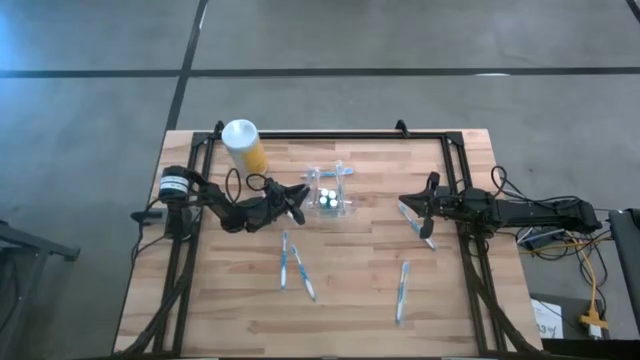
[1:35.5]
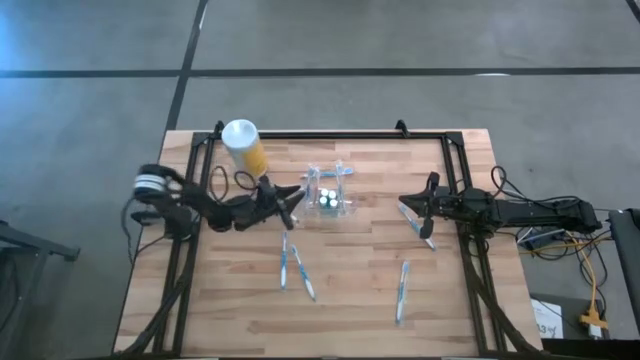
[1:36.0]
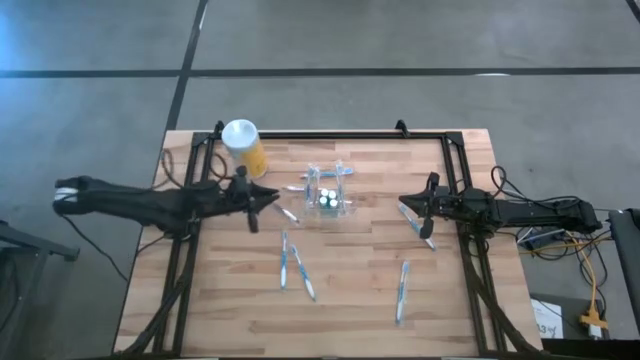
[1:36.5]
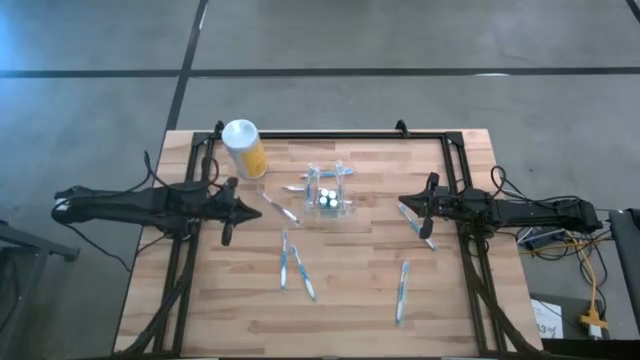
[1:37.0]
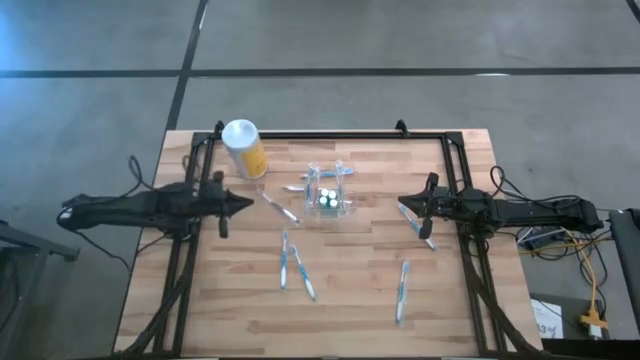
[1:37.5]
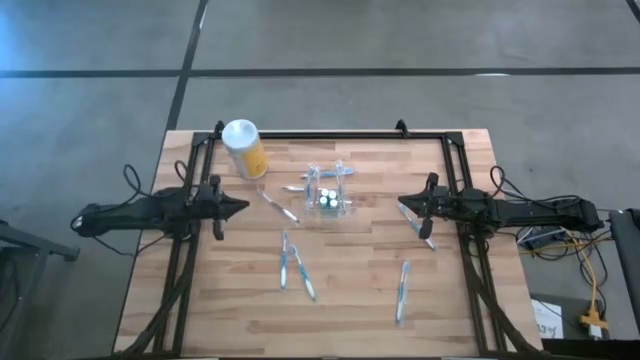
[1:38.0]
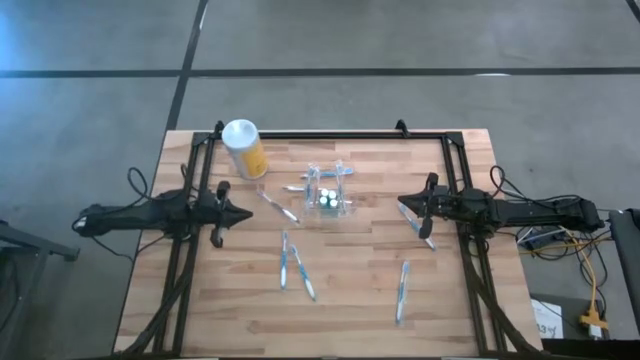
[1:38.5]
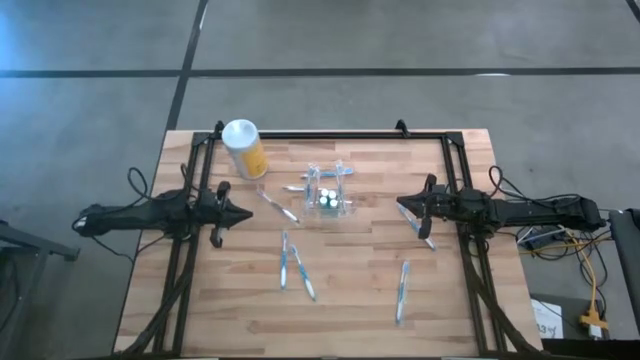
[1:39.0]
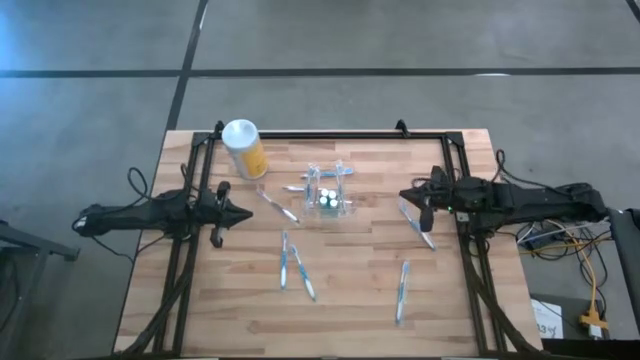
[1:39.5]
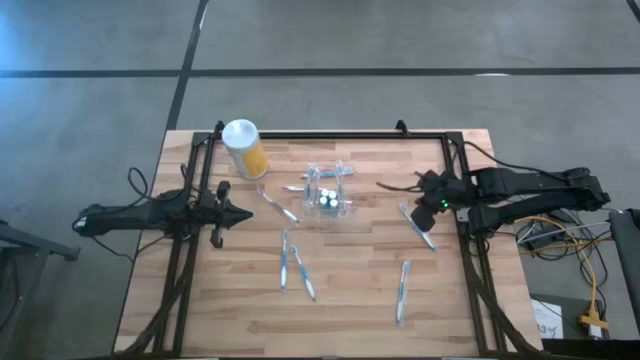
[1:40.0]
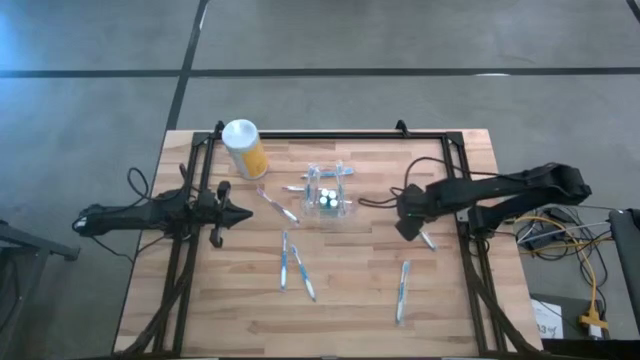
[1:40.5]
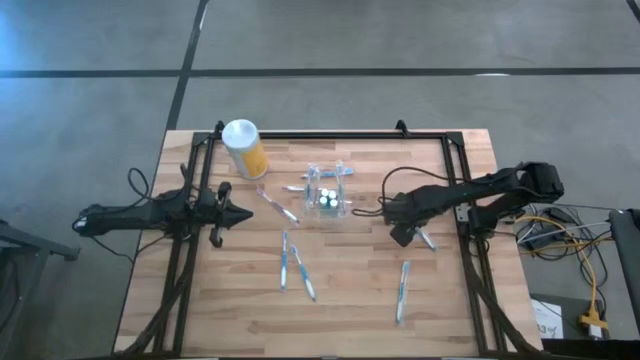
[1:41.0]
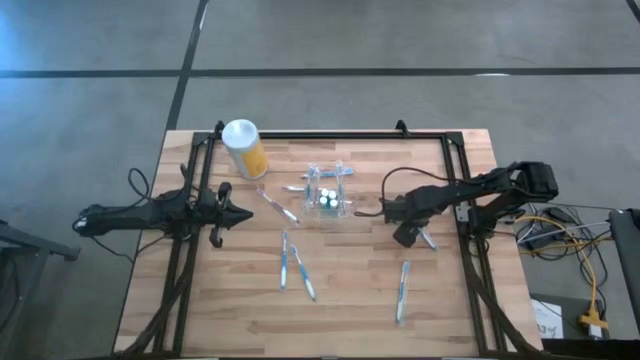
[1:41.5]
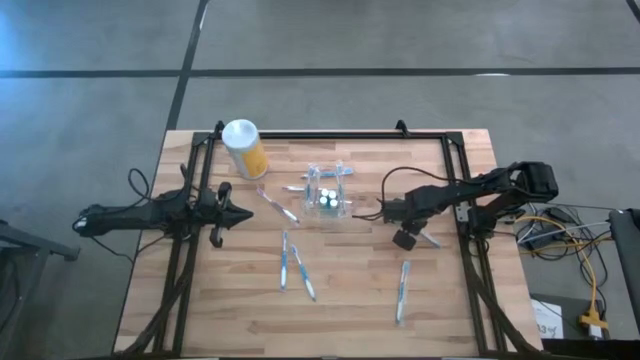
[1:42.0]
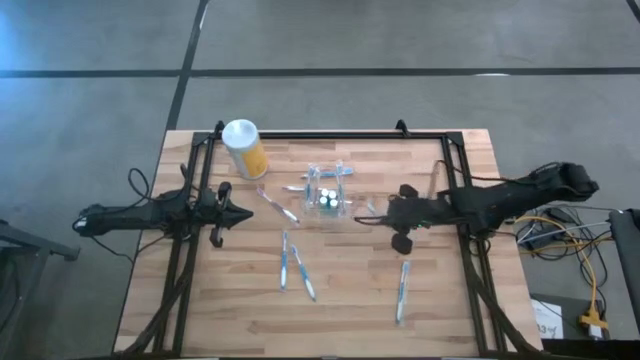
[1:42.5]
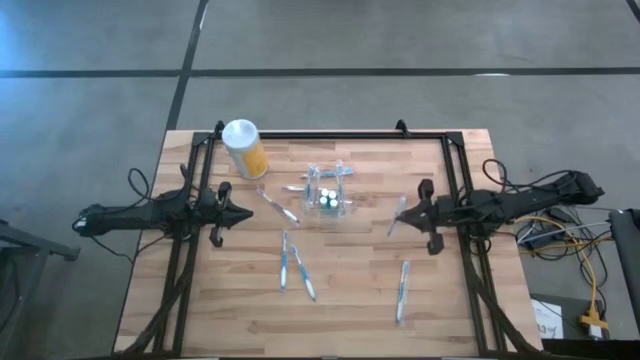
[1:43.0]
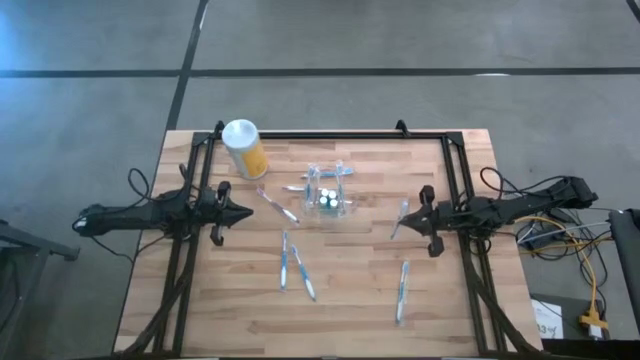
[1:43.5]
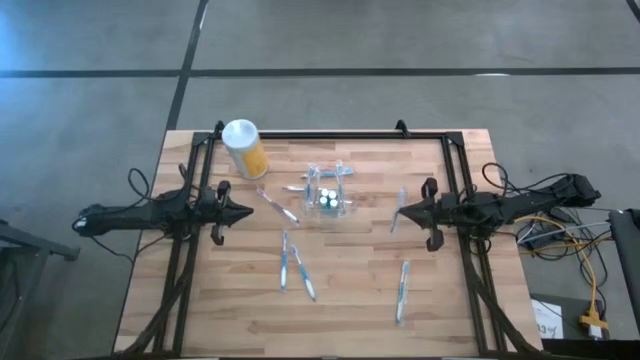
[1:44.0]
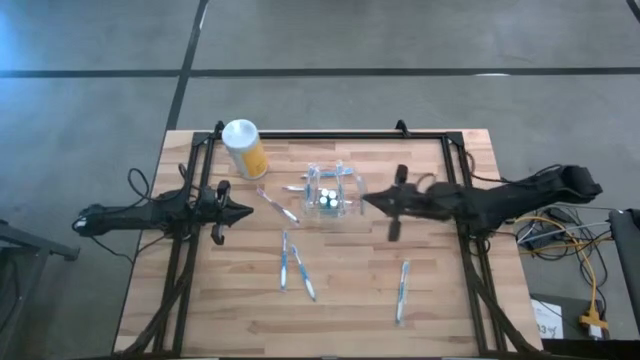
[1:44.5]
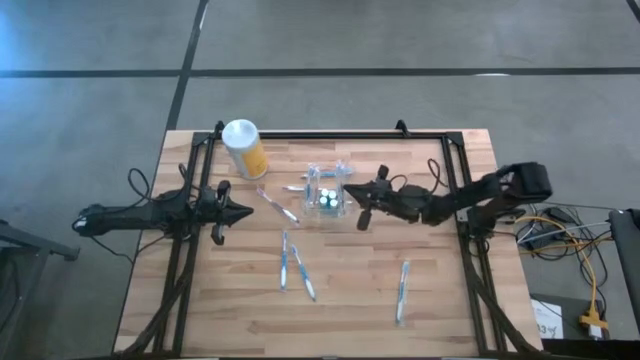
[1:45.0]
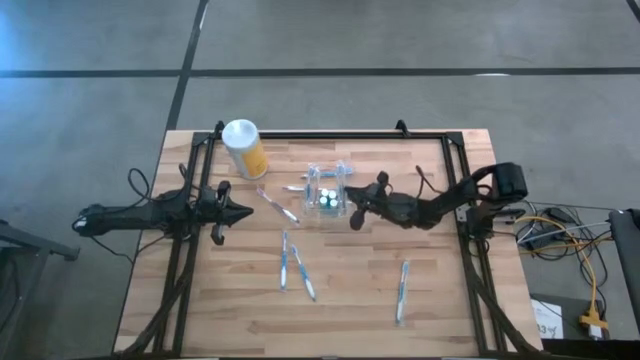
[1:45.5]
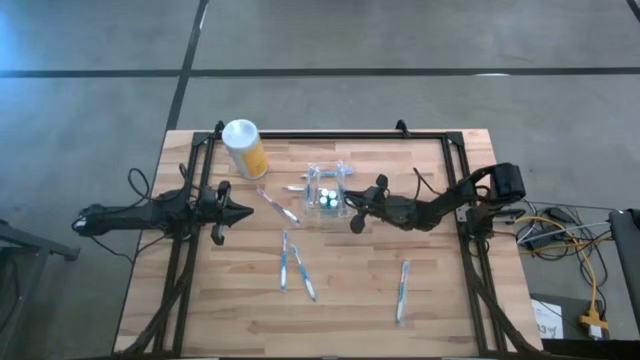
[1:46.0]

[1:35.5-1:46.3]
Task: Pick & Place toothbrushing station
Put the blue toothbrush into the right section of the transparent organizer

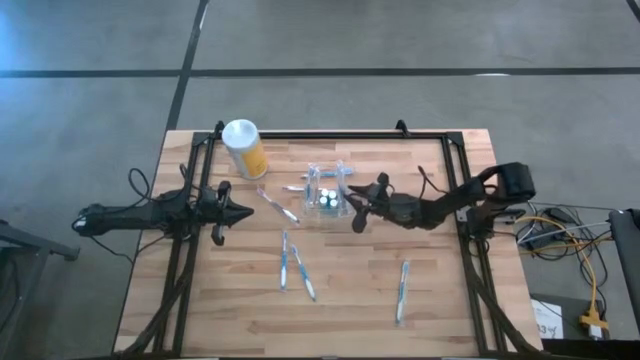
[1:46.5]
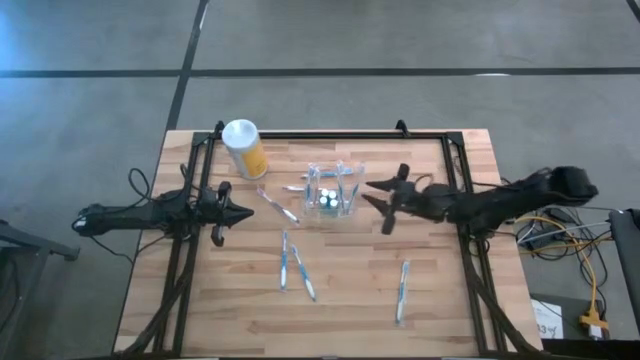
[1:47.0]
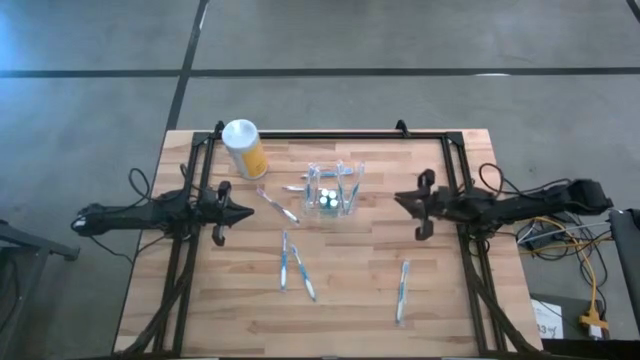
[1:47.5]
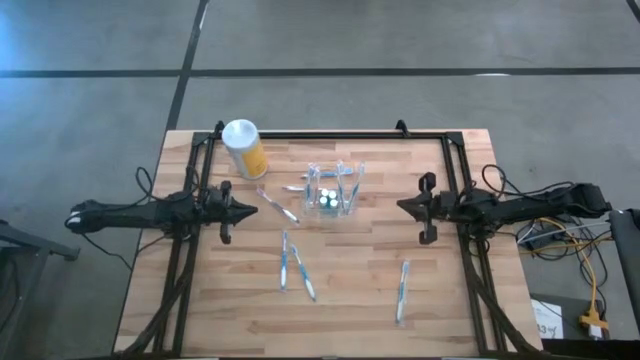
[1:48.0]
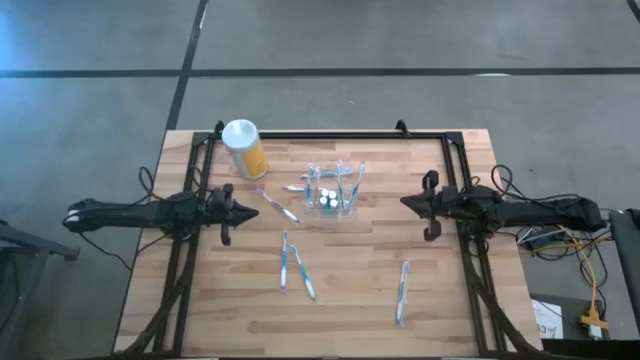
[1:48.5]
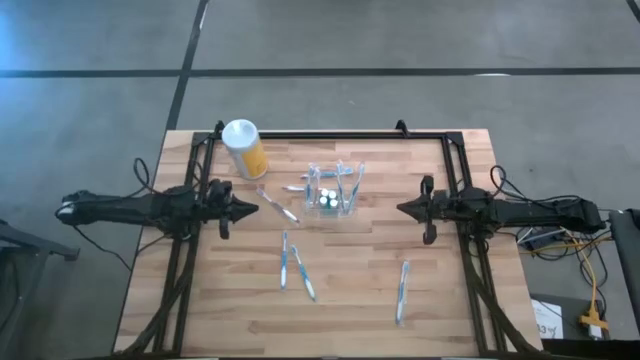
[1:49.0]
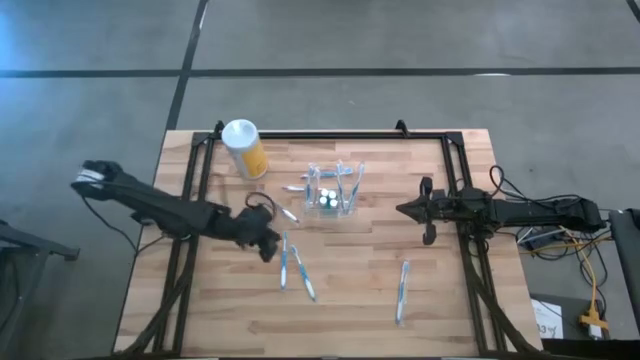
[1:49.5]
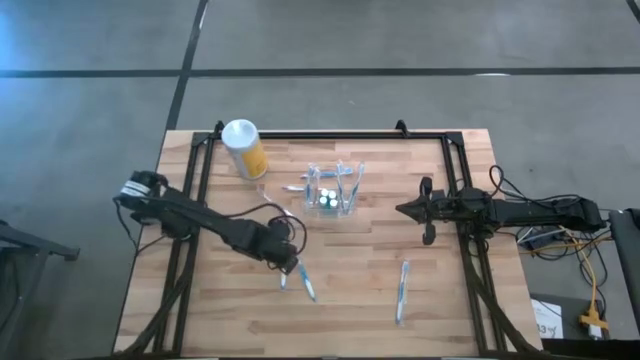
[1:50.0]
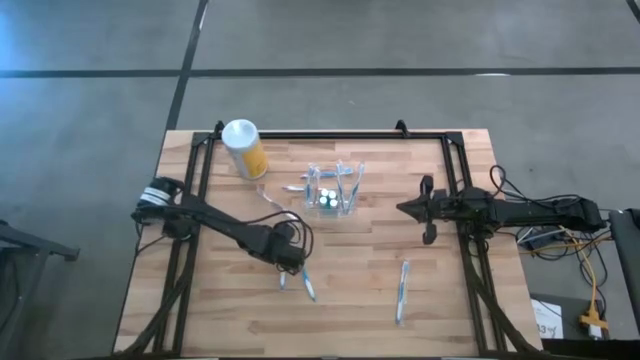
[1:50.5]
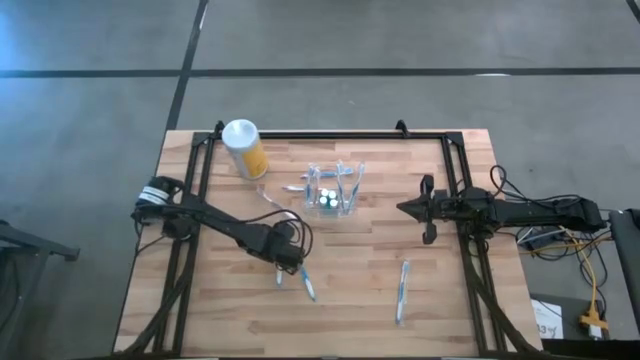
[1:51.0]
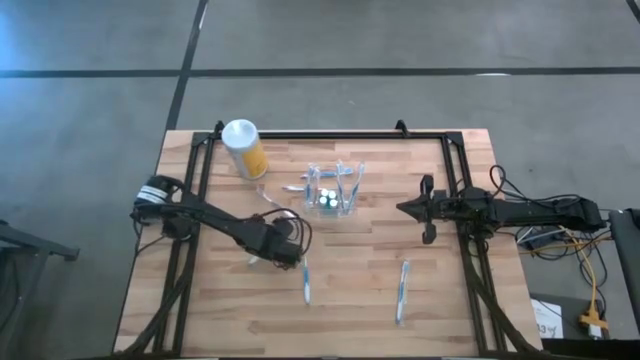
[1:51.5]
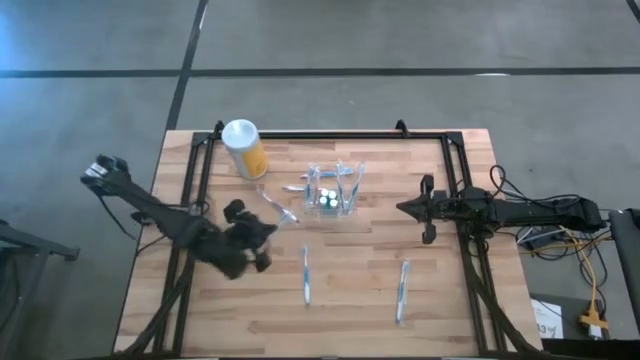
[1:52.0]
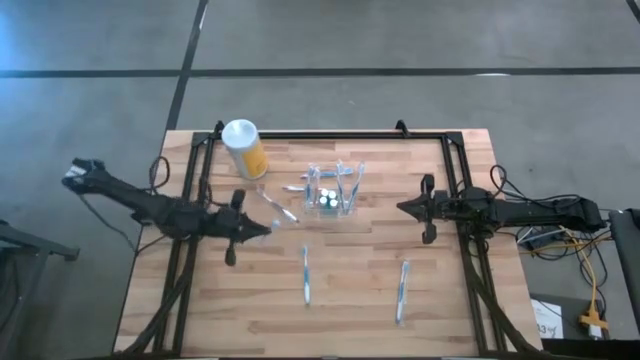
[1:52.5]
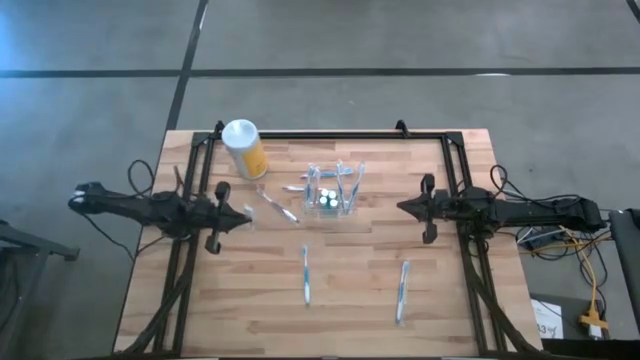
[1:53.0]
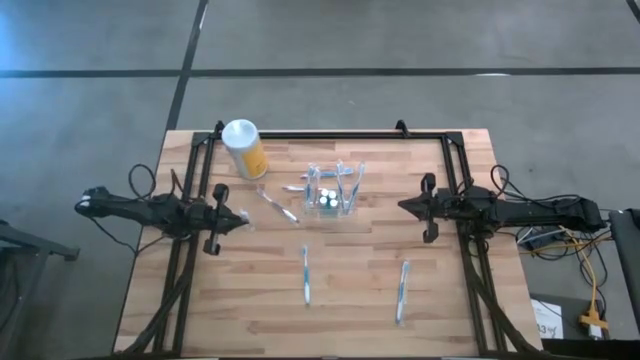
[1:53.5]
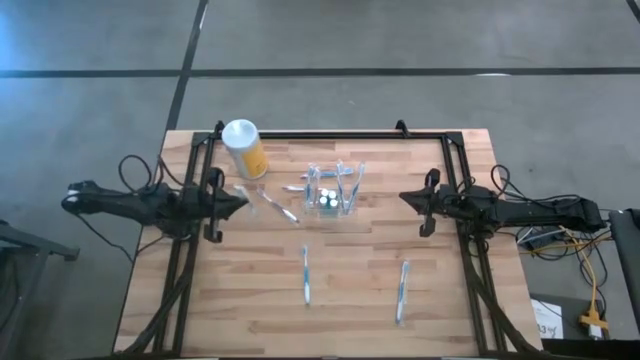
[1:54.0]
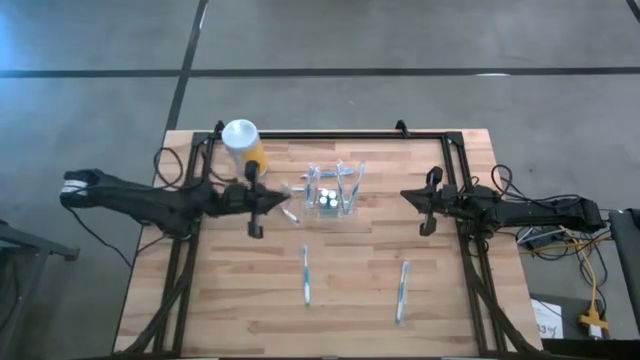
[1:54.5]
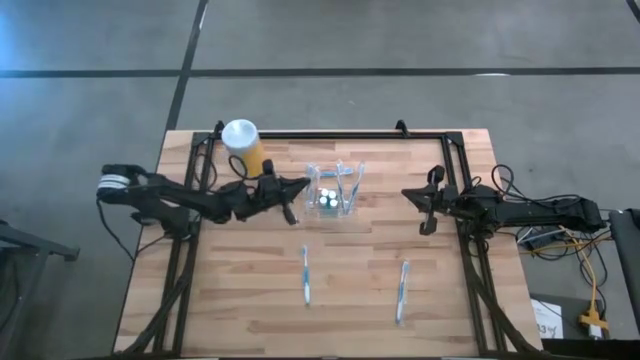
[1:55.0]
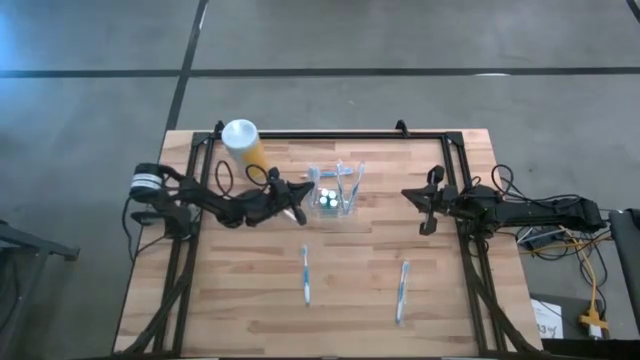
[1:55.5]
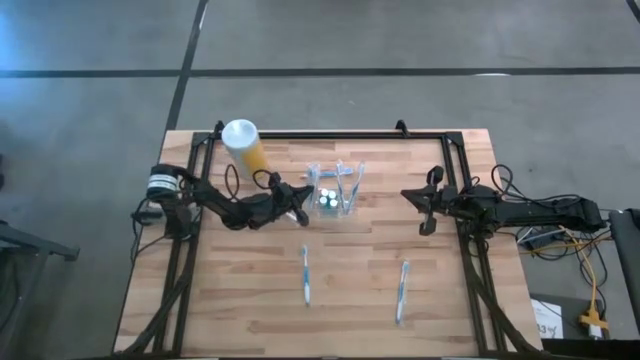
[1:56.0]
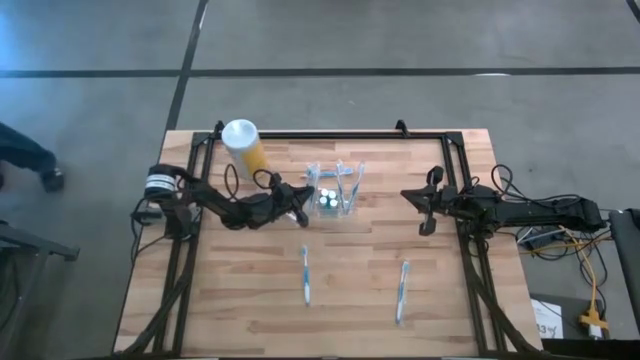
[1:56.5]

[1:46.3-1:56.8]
Put the blue toothbrush into the left section of the transparent organizer
